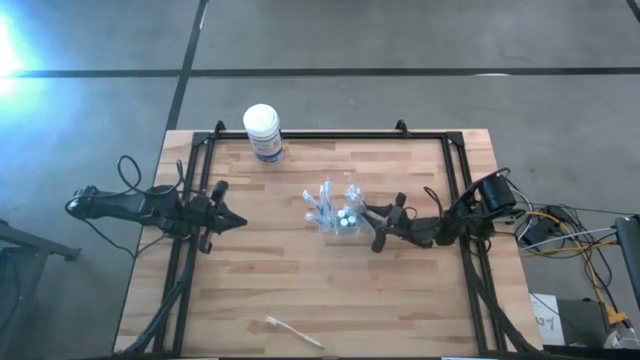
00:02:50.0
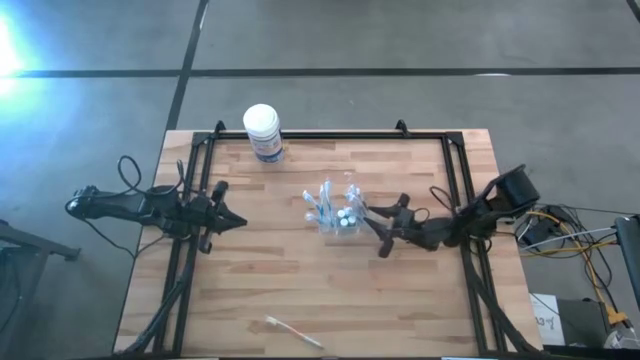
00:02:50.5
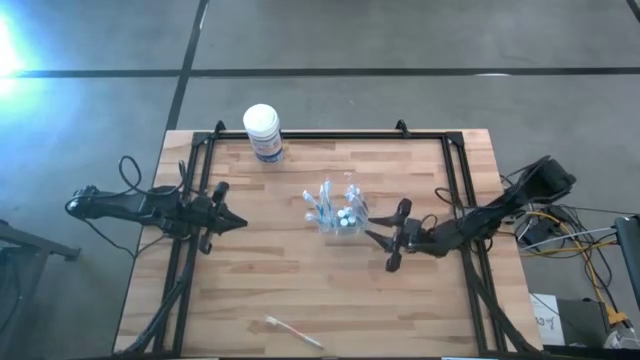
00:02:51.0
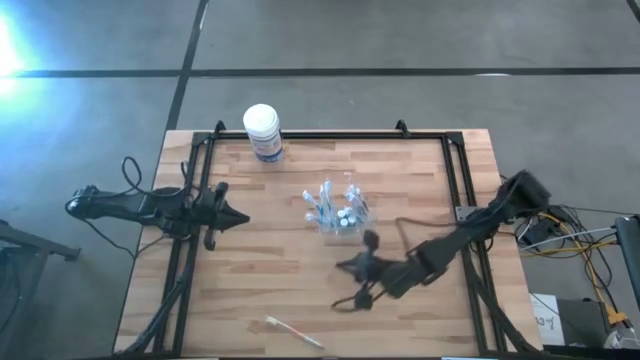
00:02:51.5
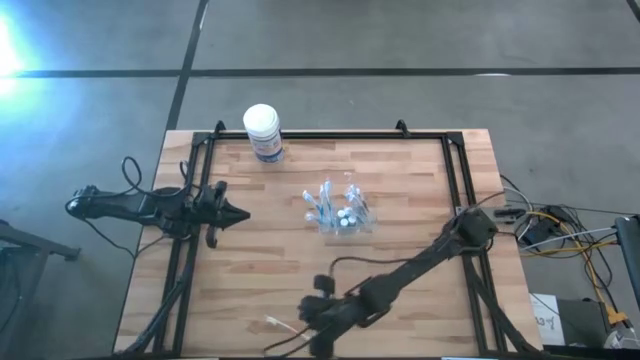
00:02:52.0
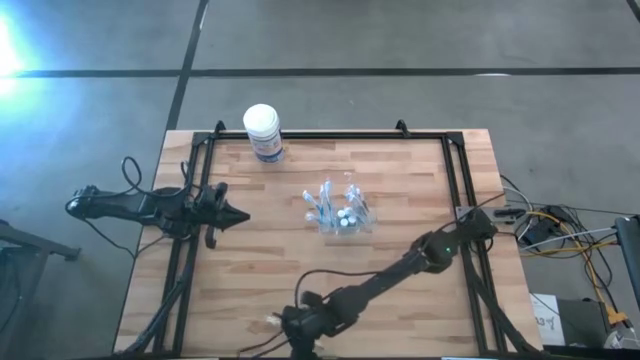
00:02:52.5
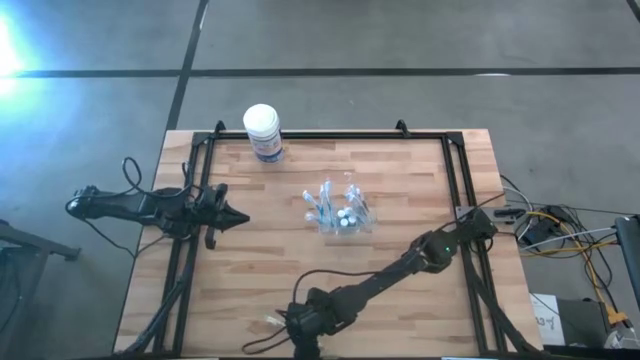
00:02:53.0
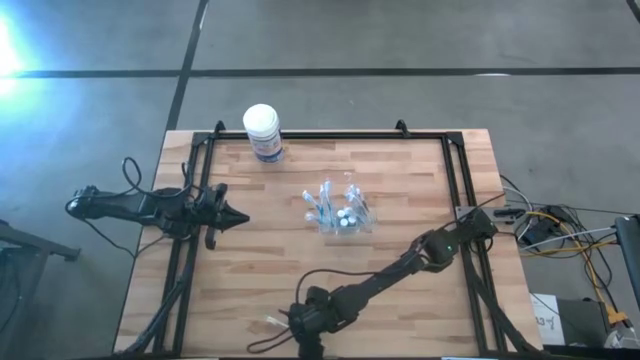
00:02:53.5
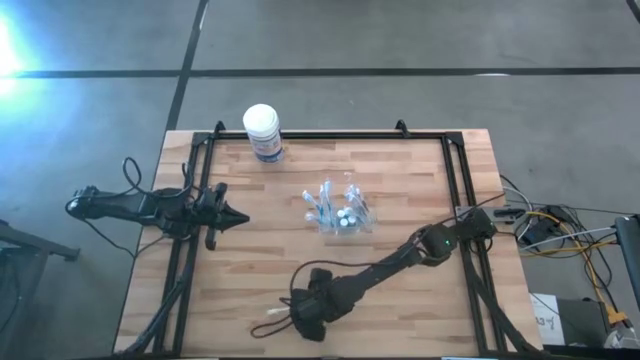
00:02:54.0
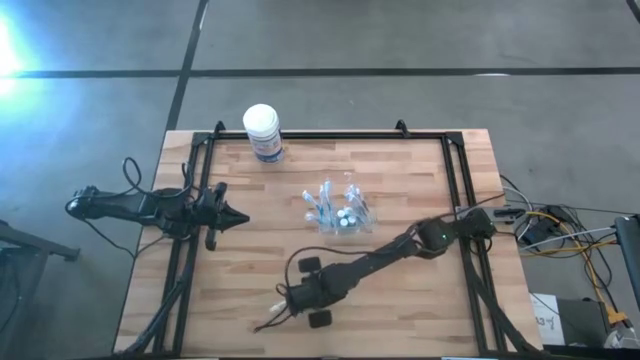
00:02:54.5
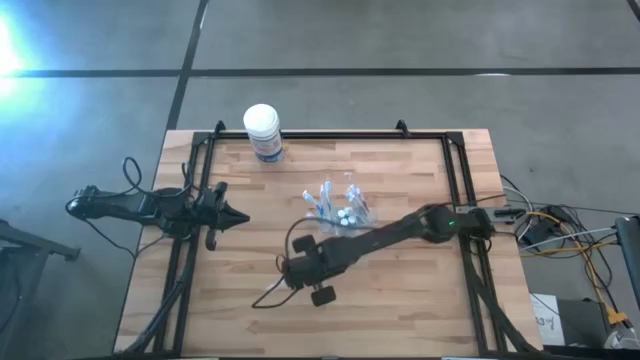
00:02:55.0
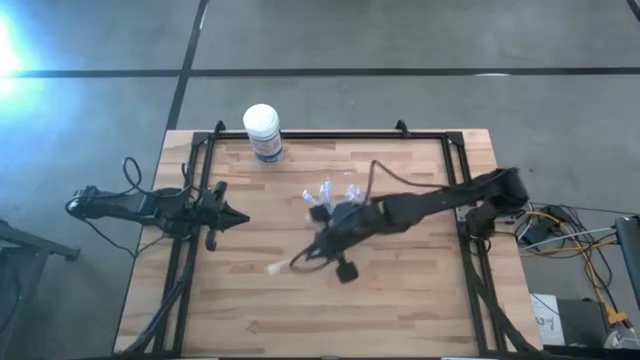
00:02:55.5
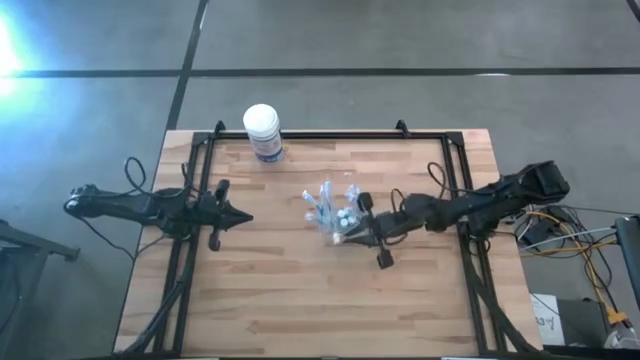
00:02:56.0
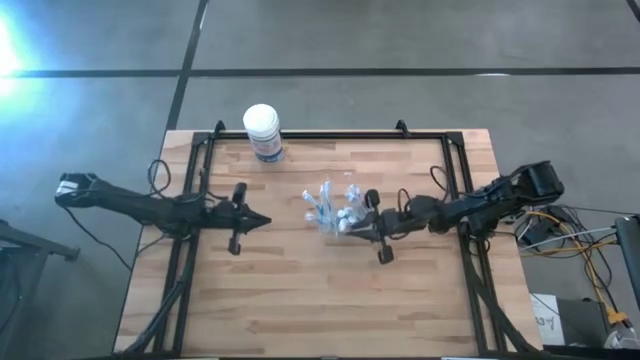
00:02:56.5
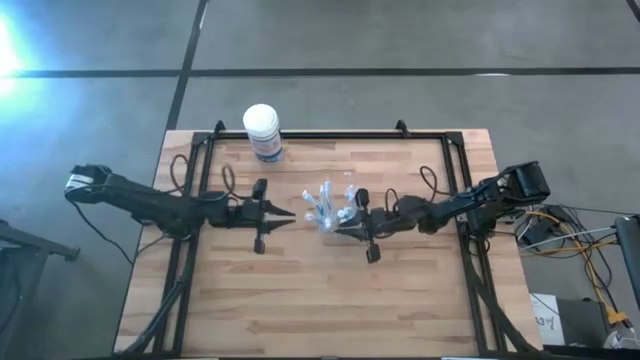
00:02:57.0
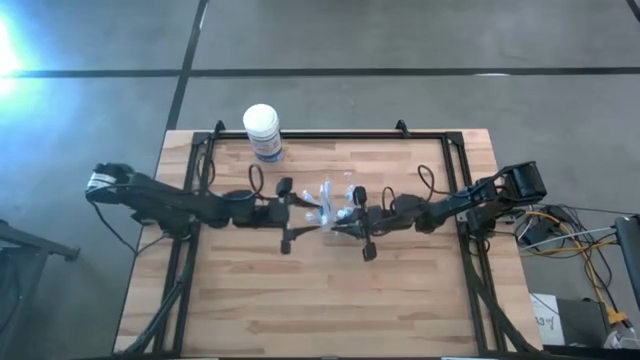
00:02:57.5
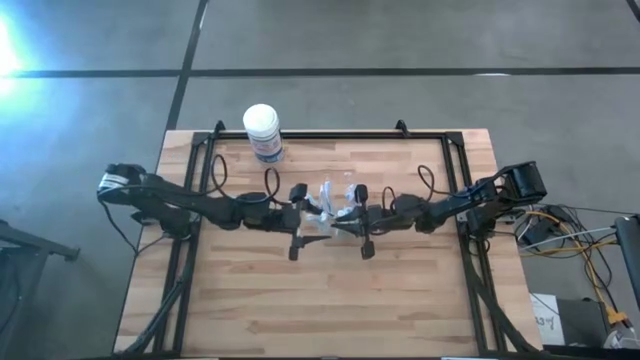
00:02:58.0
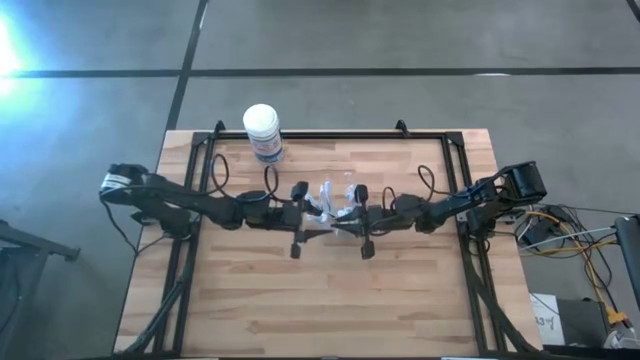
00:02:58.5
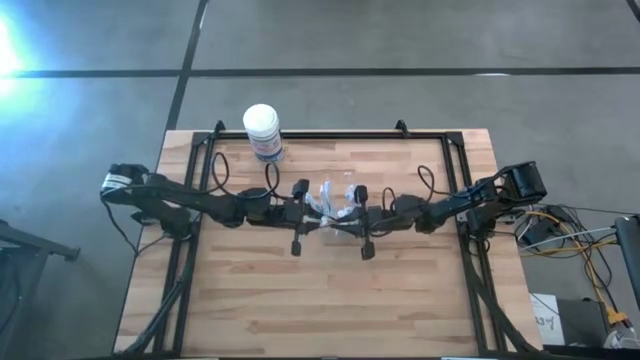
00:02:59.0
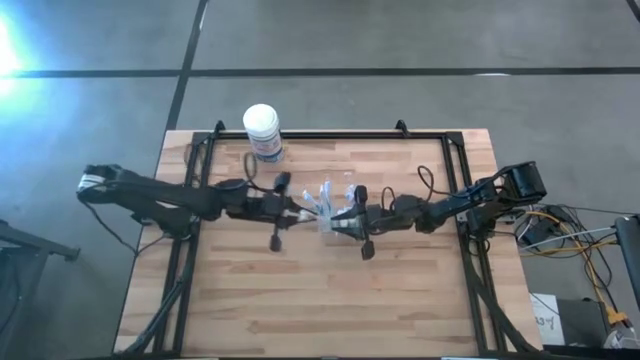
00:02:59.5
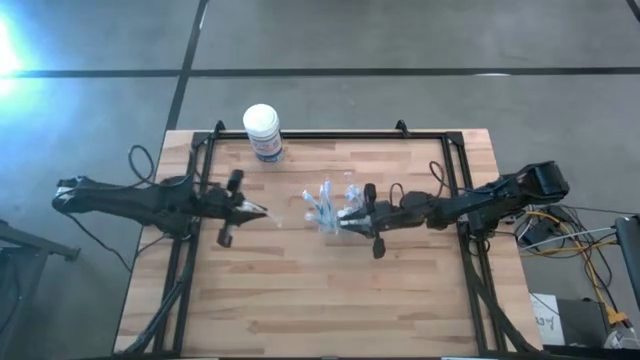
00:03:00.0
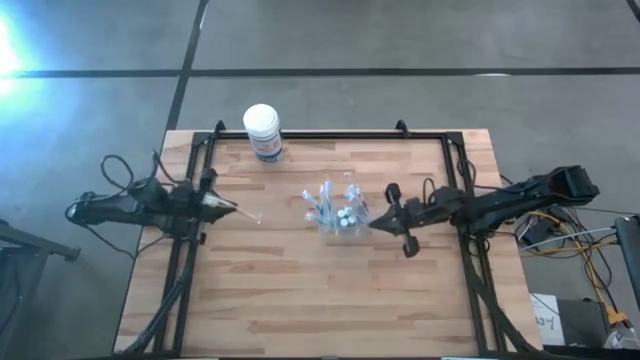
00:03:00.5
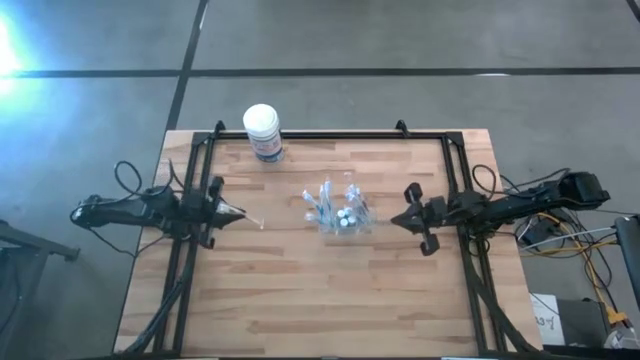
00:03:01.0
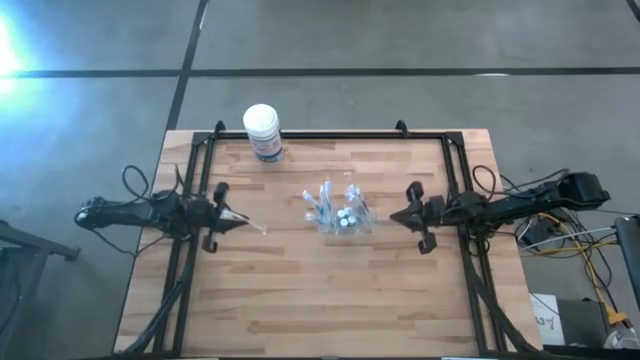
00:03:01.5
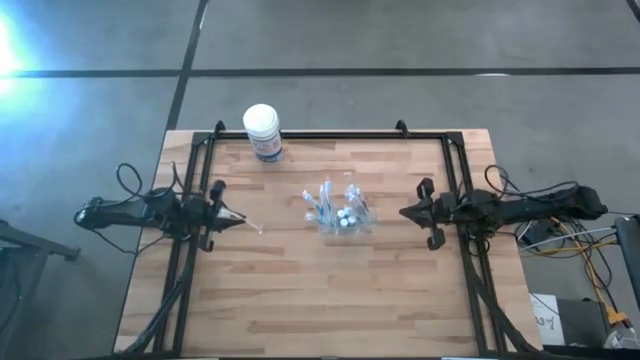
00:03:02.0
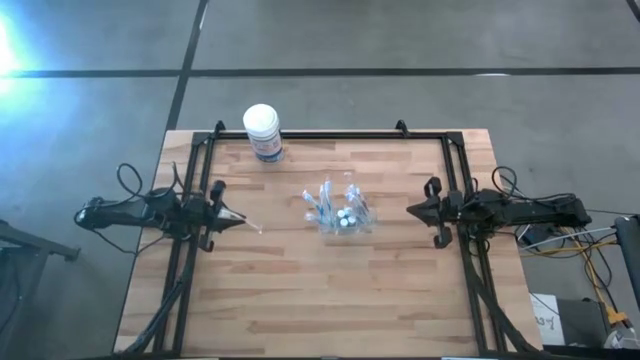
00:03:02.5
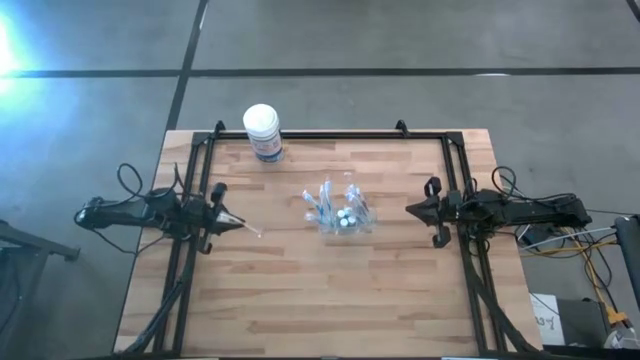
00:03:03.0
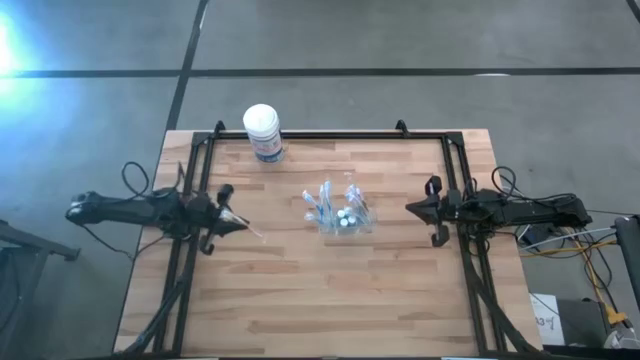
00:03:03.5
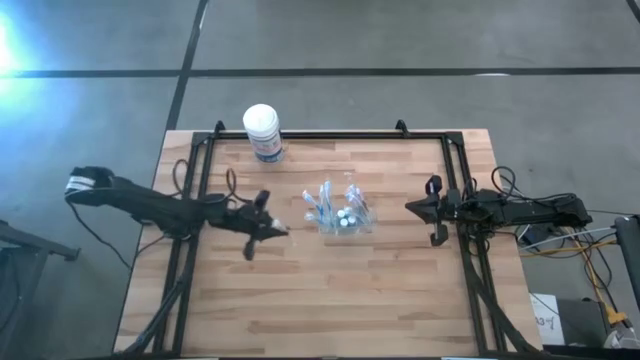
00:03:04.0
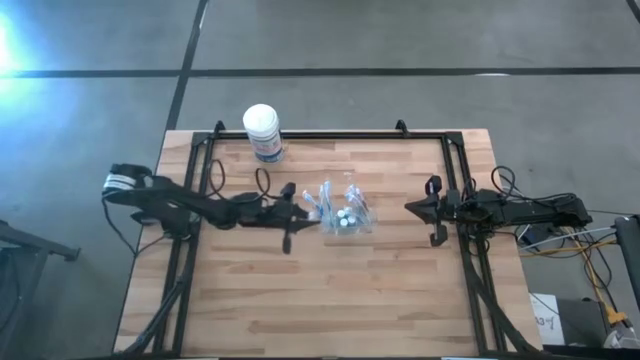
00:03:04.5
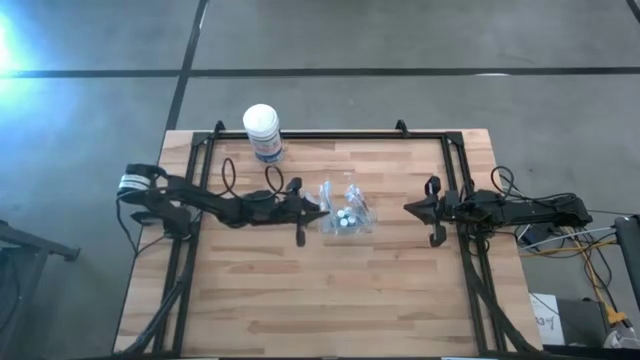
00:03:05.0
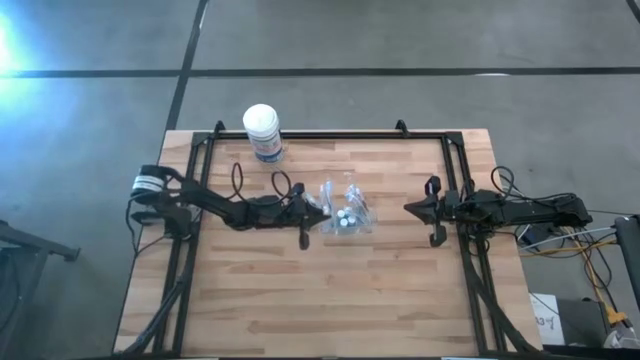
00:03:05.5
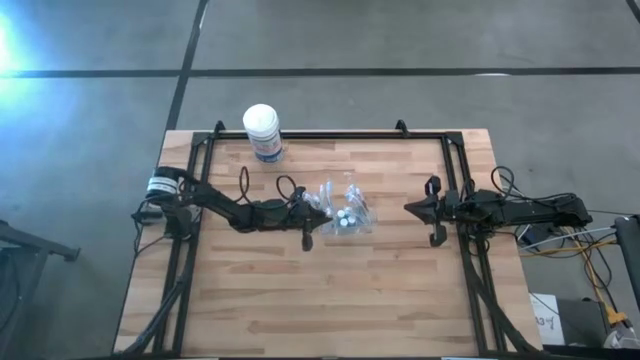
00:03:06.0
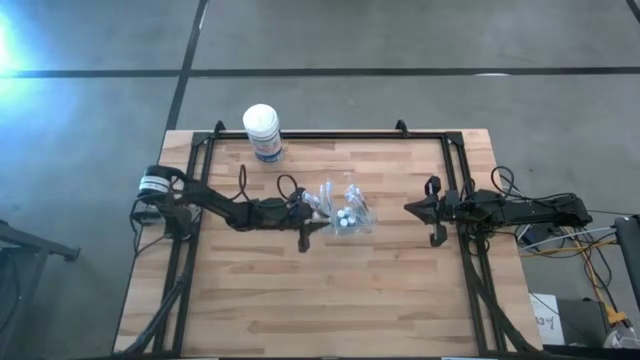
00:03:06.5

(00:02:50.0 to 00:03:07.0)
Task: Pick & Place toothbrushing station
Put the orange toothbrush into the transparent organizer

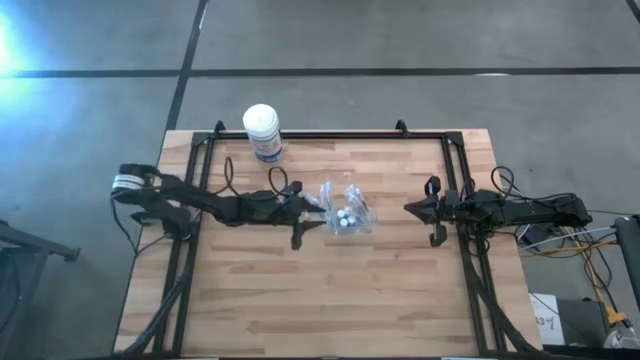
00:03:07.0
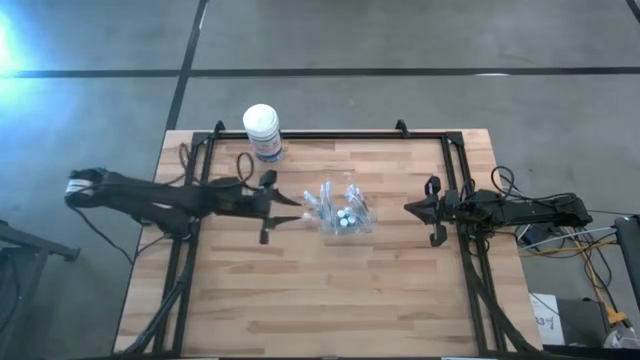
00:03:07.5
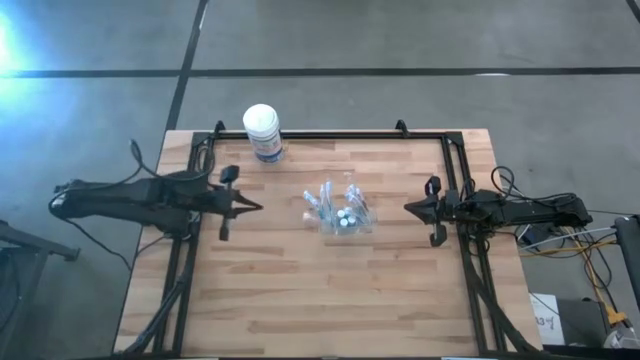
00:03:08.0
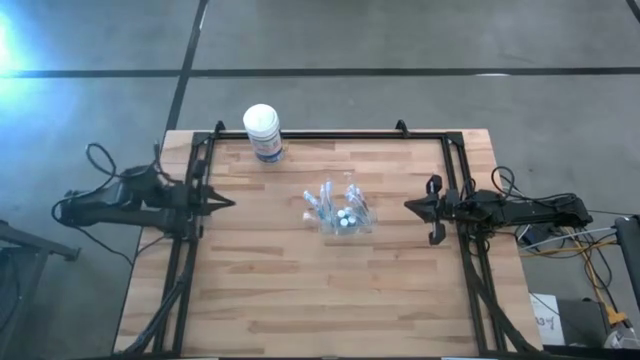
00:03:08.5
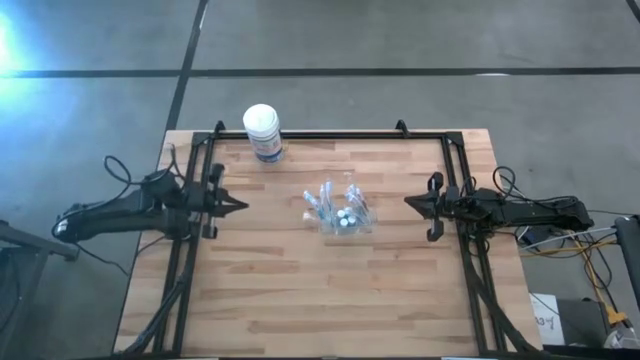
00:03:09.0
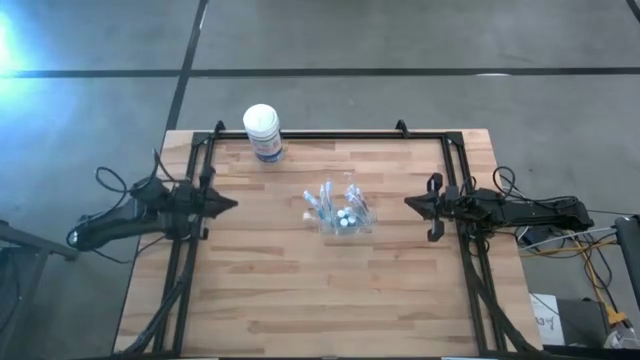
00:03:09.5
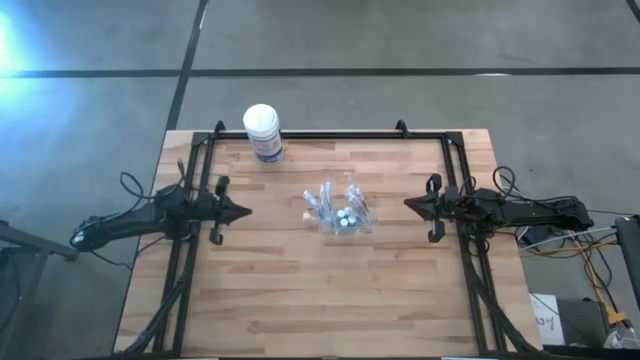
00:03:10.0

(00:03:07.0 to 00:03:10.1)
Return to Home Position
